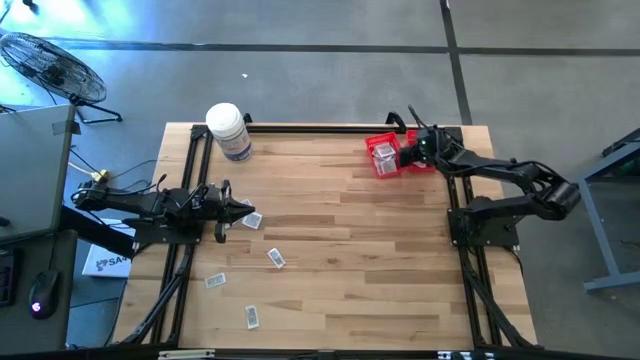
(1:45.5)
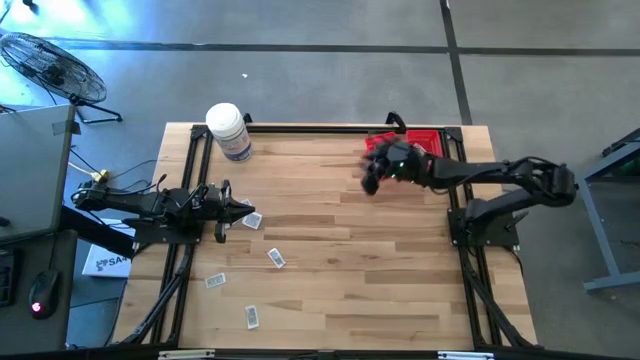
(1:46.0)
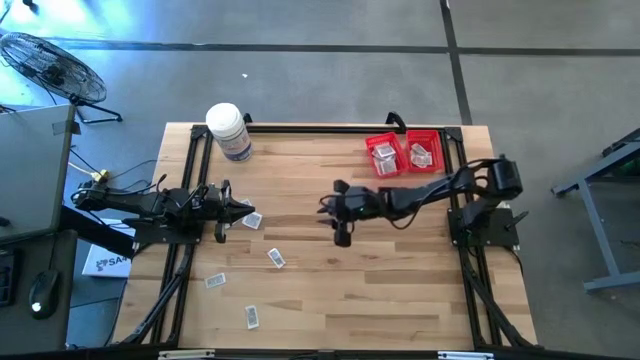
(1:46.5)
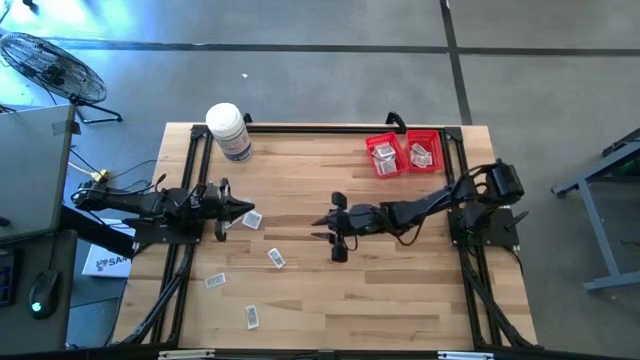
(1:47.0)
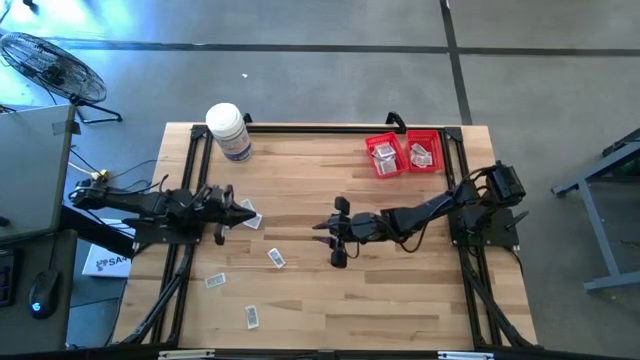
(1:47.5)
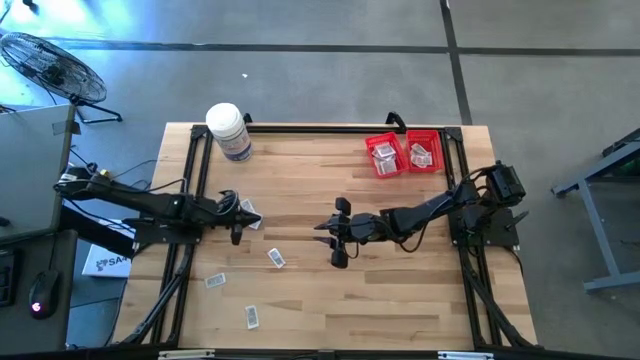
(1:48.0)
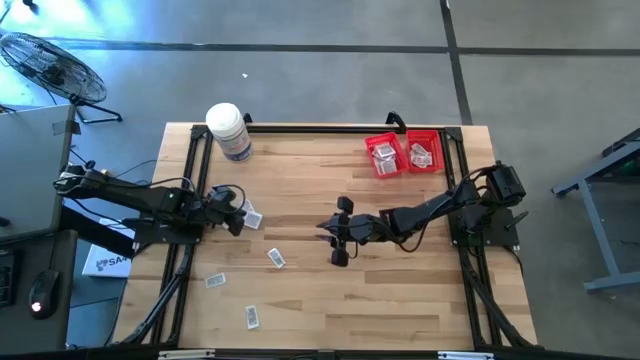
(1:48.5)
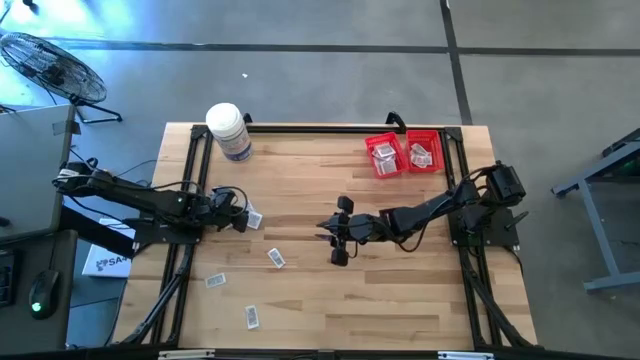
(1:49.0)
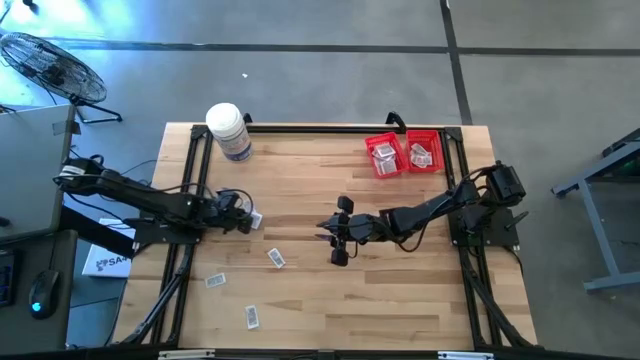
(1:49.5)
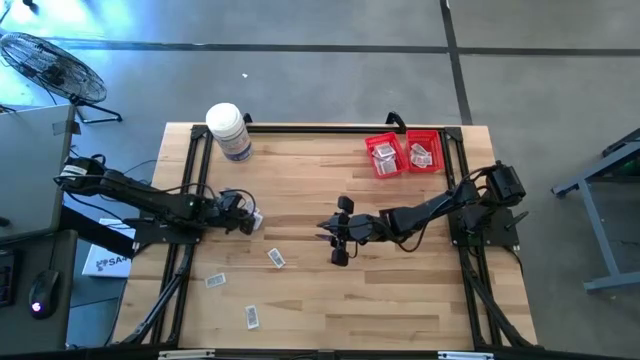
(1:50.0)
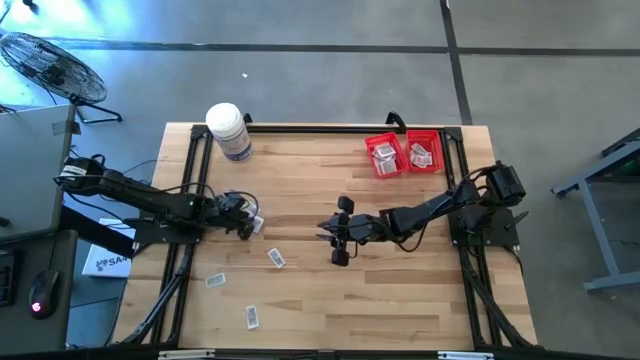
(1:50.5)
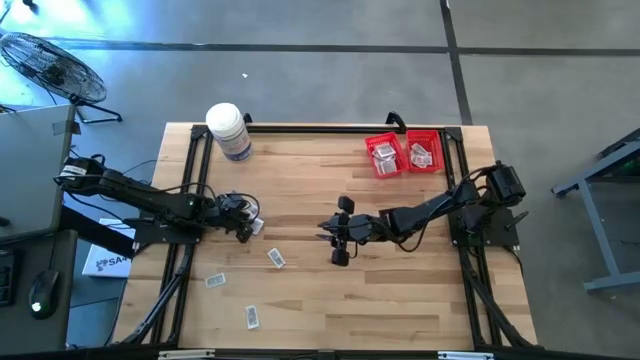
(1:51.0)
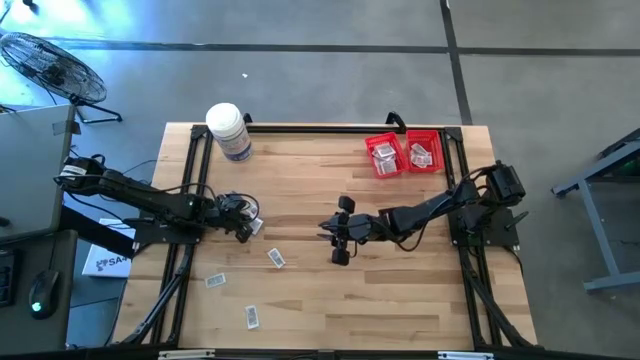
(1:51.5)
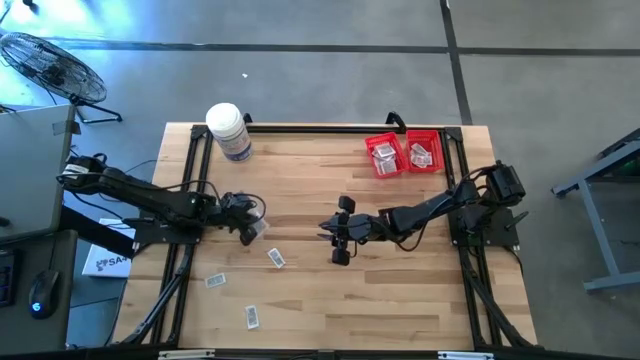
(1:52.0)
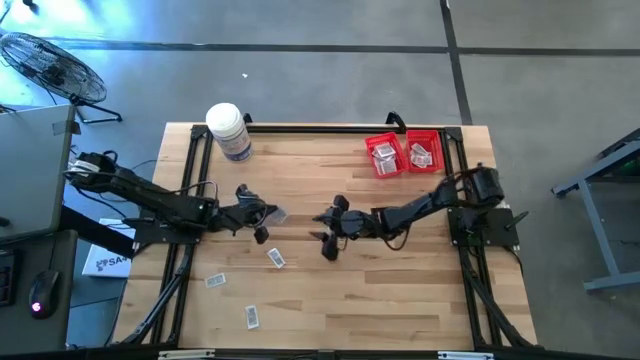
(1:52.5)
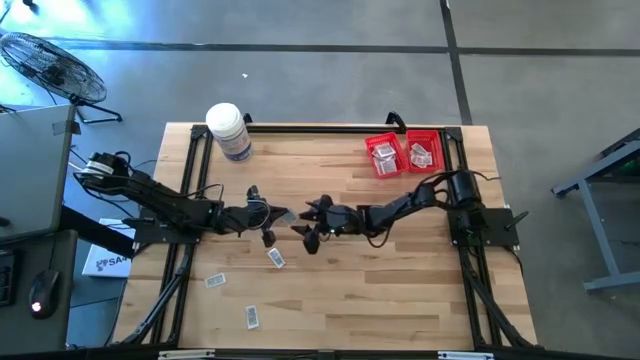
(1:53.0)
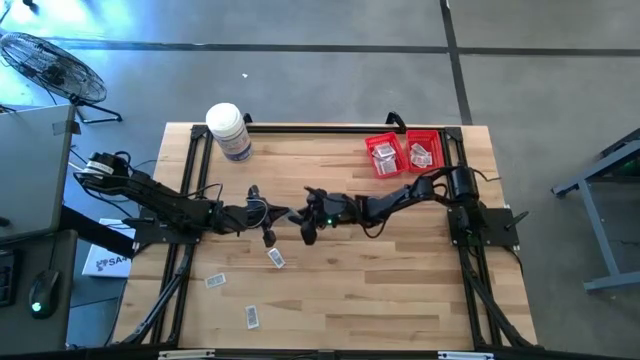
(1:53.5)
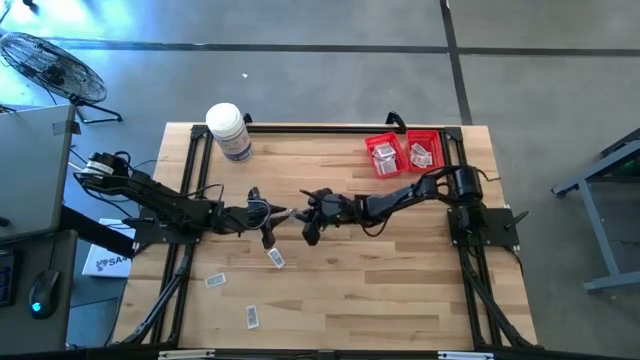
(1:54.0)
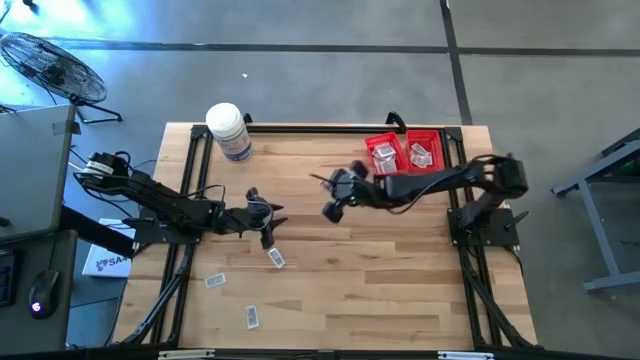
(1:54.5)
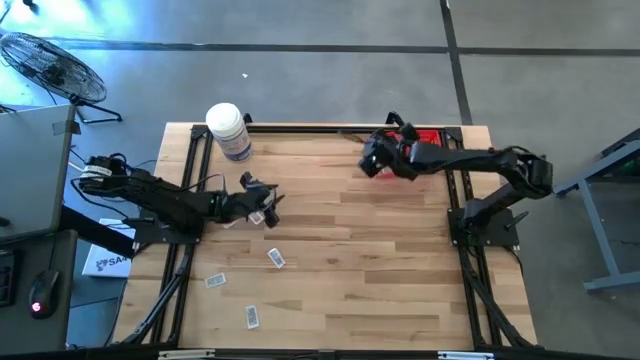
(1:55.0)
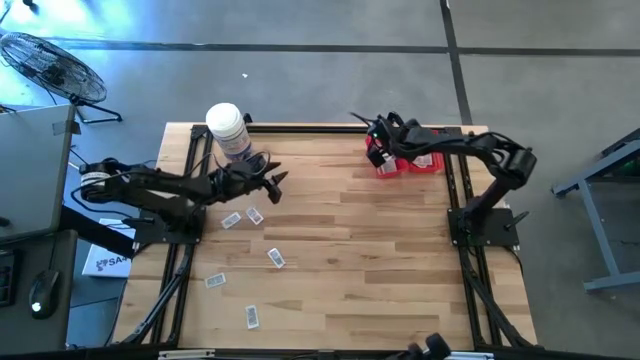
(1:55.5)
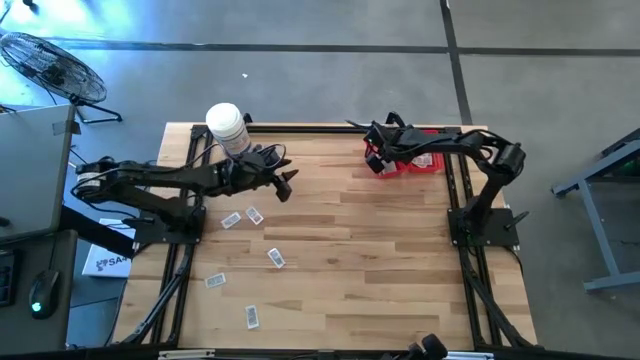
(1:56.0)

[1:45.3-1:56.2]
Task: Pick & Place First Aid Supplies
Put the towelette pack into the left red bin

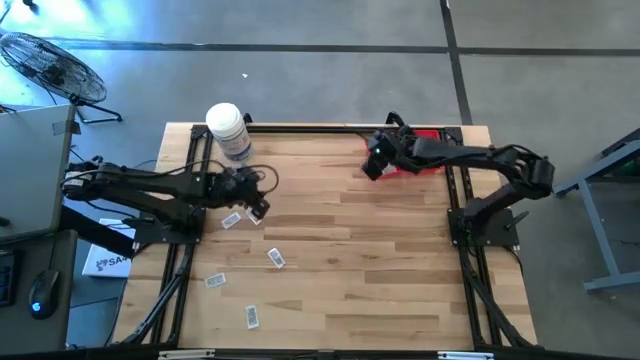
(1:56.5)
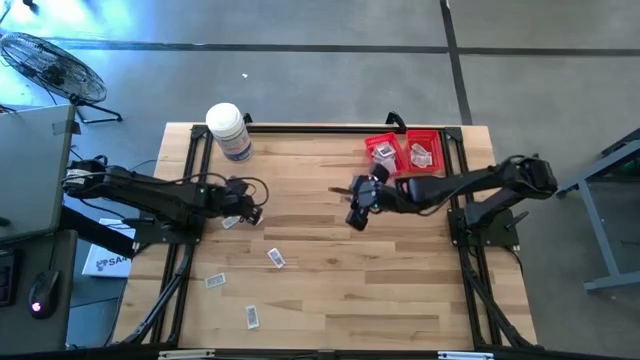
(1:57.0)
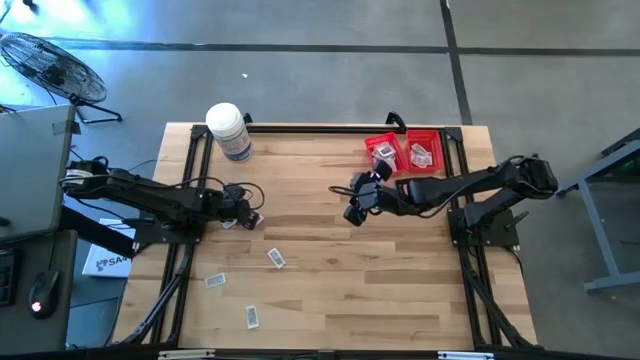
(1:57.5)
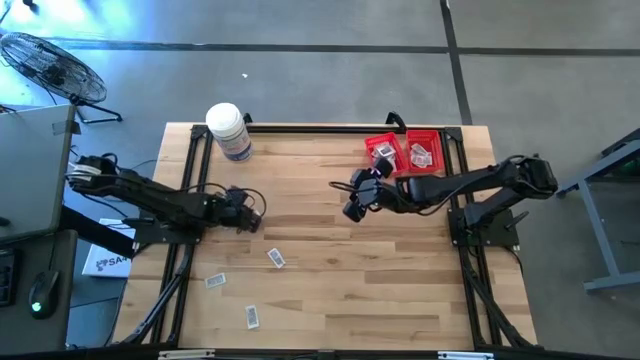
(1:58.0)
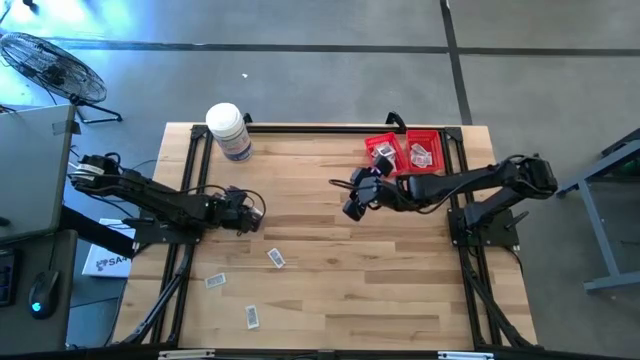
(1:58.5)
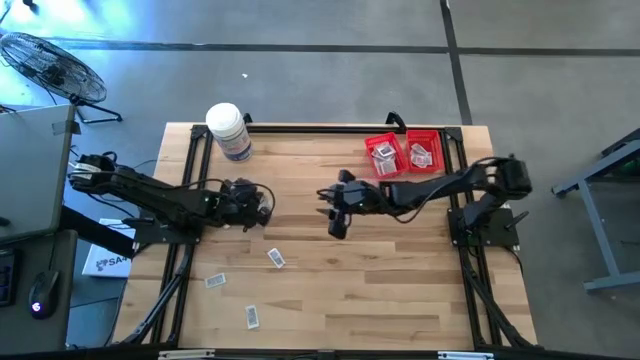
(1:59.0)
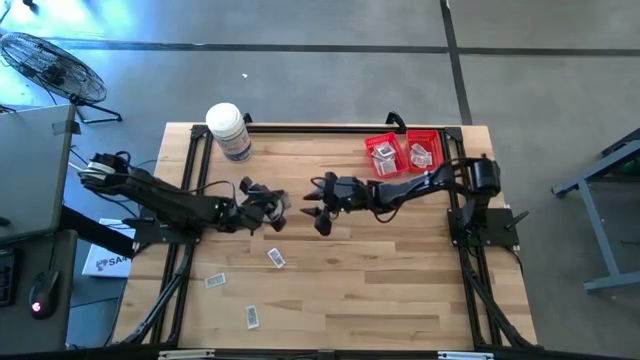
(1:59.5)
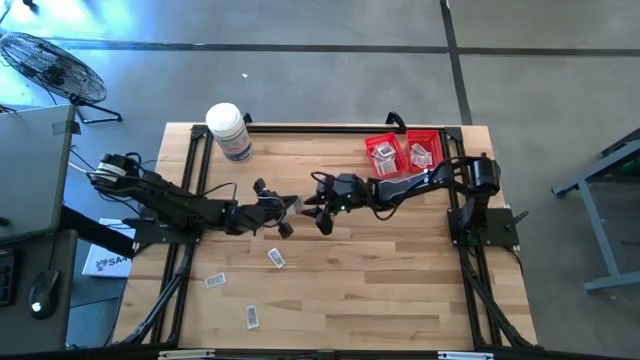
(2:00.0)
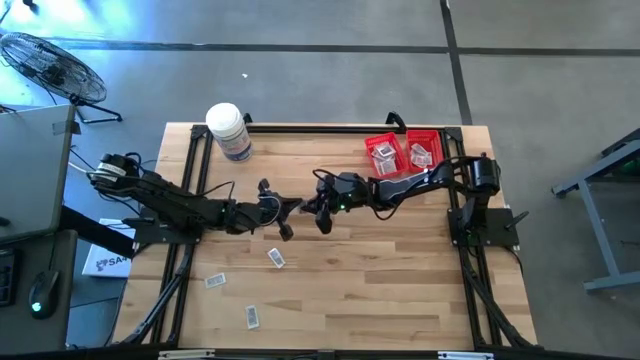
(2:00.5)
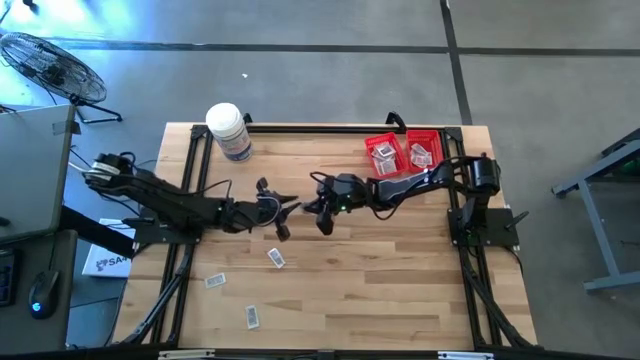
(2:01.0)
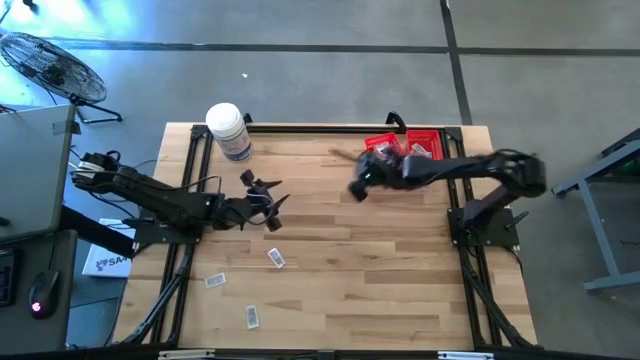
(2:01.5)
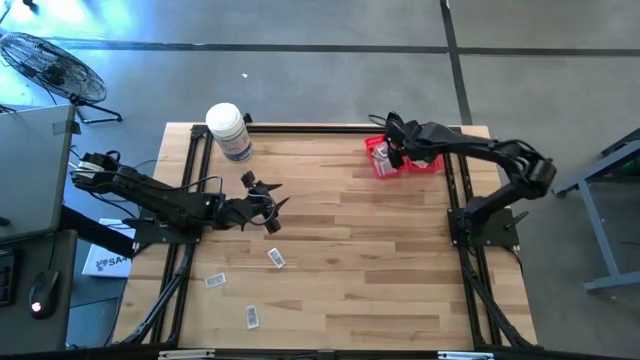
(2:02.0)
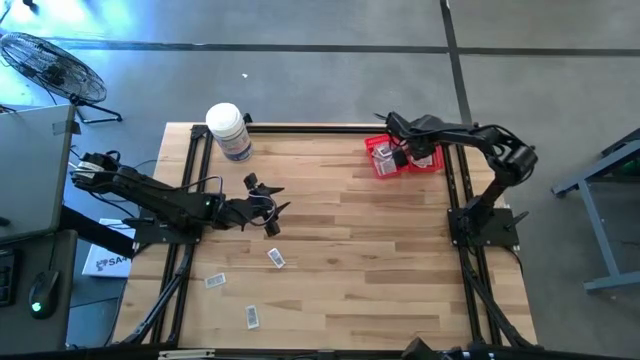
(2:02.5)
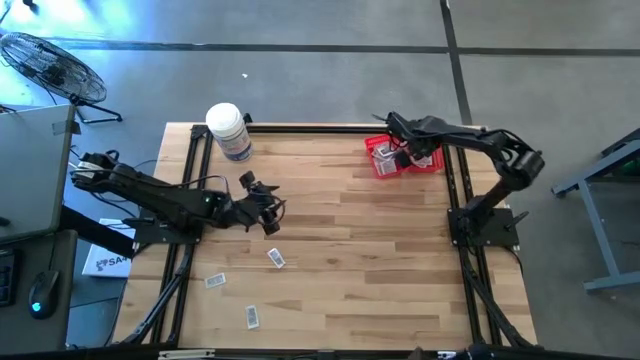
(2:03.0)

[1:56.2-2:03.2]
Put the ointment pack into the right red bin

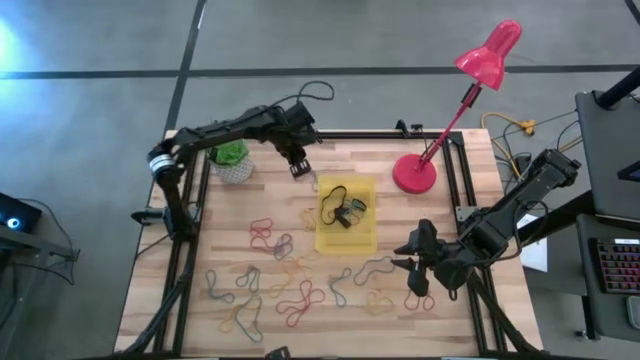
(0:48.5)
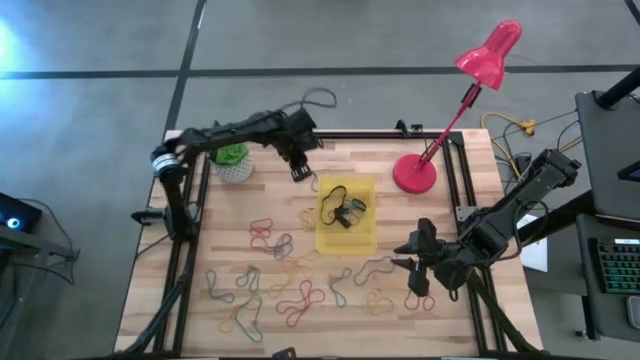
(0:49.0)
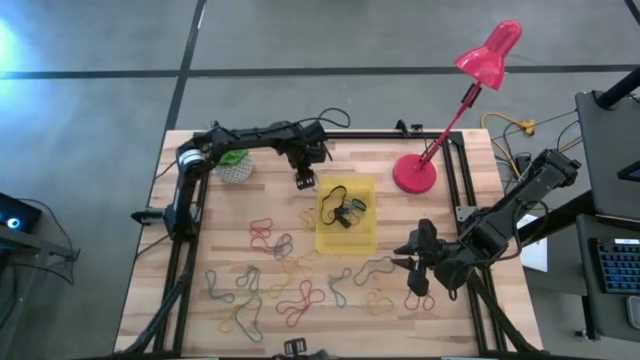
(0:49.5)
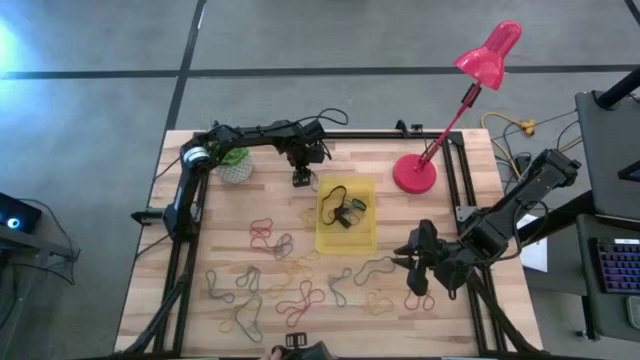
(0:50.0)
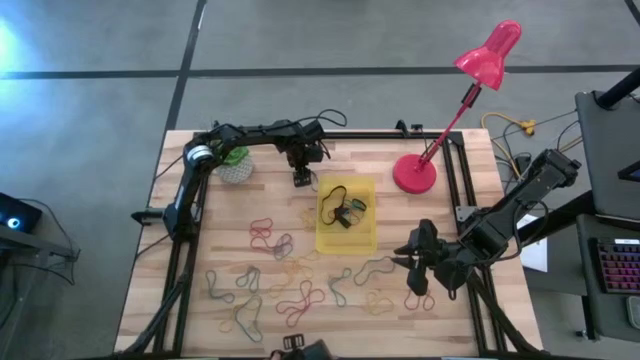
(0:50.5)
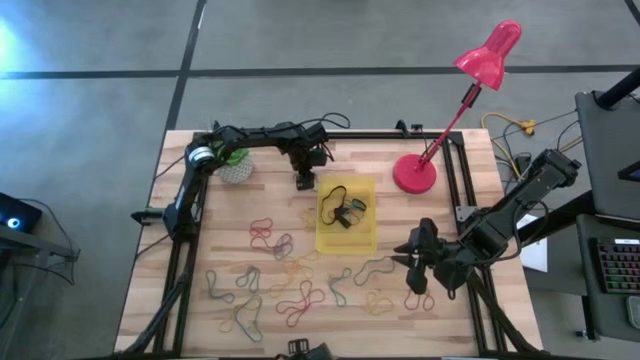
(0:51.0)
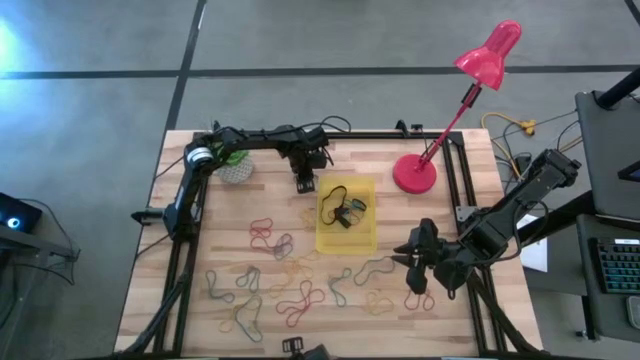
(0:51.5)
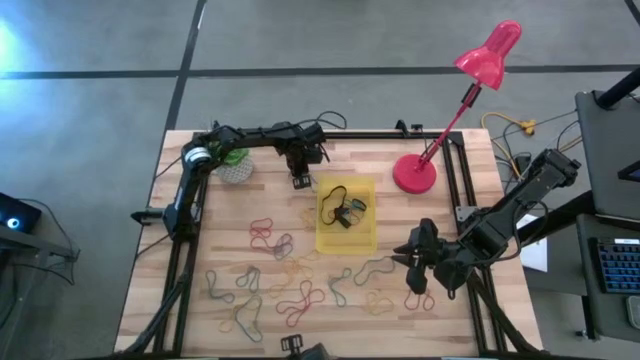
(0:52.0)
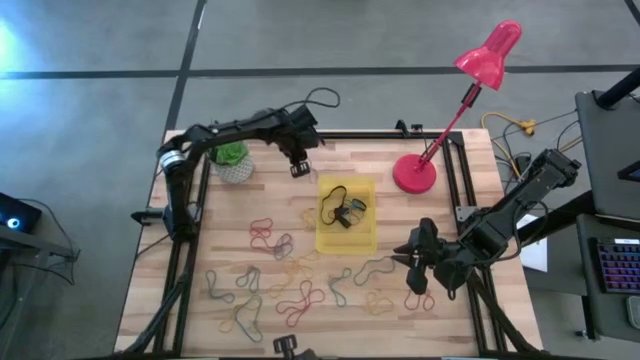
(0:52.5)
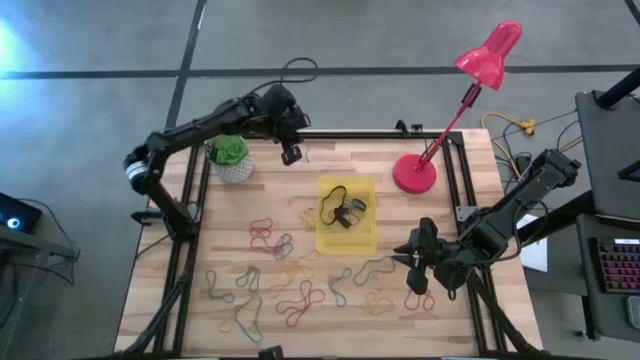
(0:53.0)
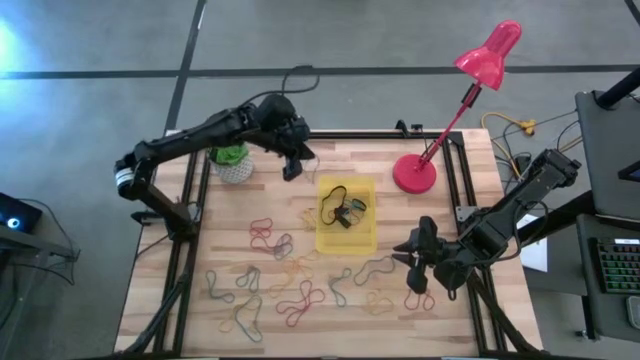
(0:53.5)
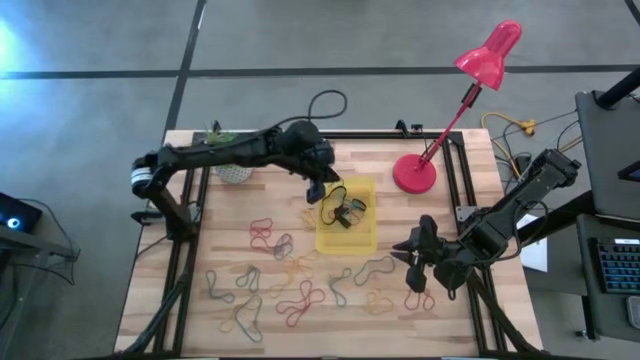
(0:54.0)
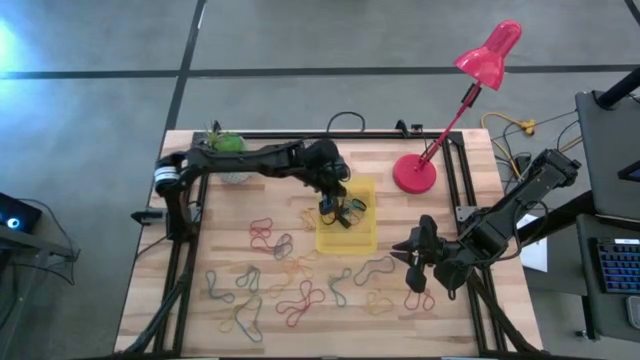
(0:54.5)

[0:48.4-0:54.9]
Task: Pick and place rubber bands into bin
Put the blue rubber band into the bin
